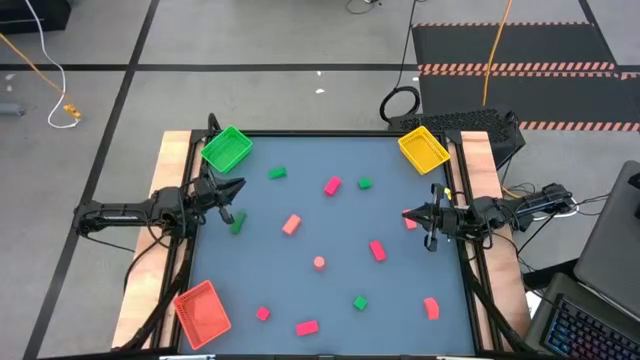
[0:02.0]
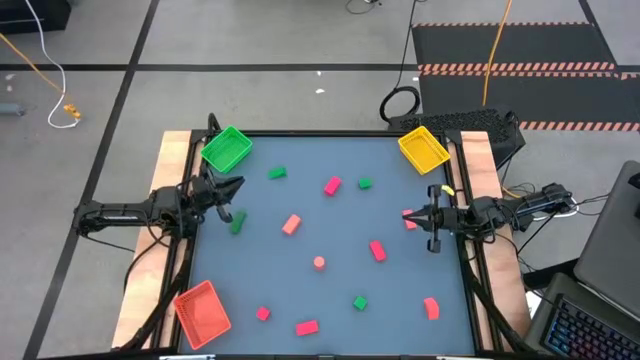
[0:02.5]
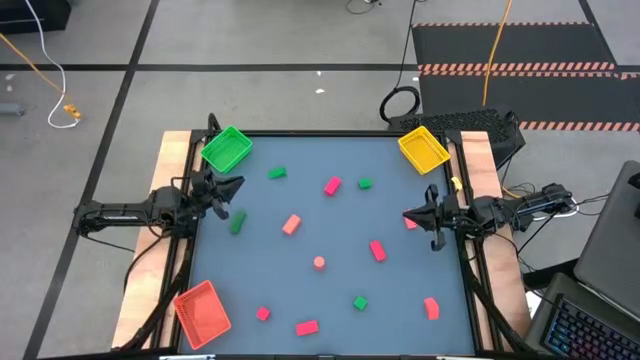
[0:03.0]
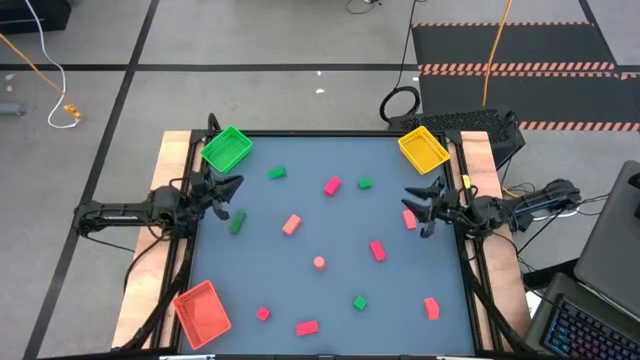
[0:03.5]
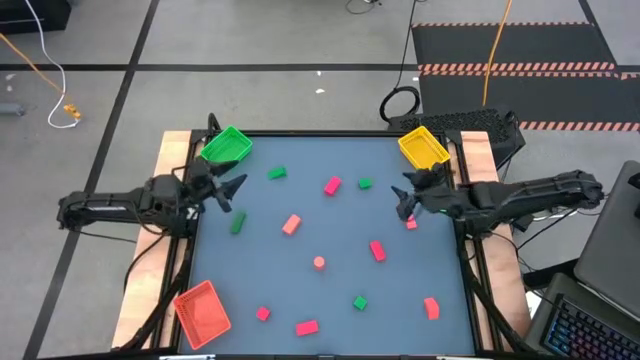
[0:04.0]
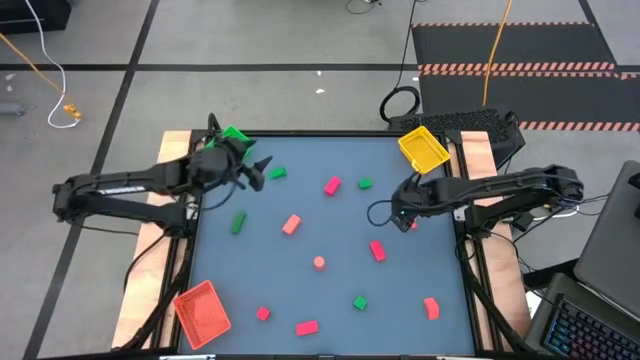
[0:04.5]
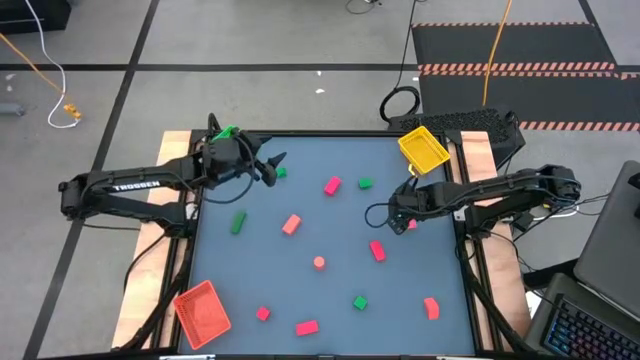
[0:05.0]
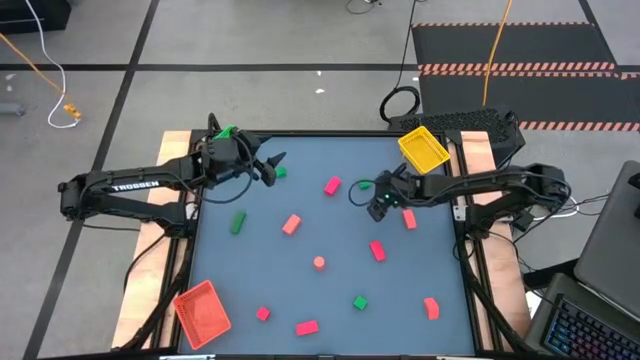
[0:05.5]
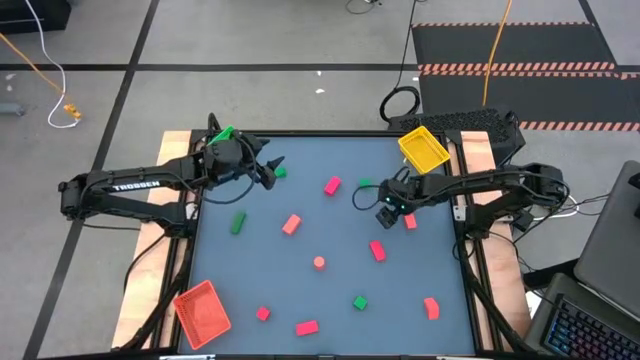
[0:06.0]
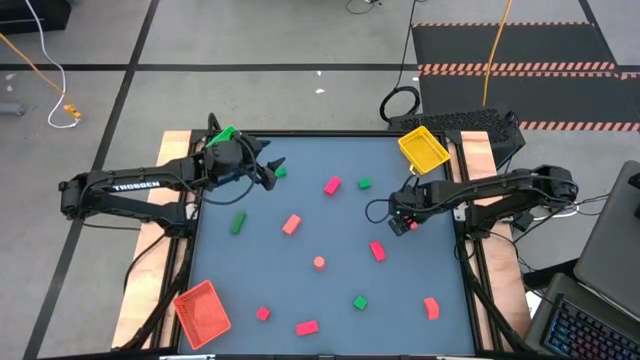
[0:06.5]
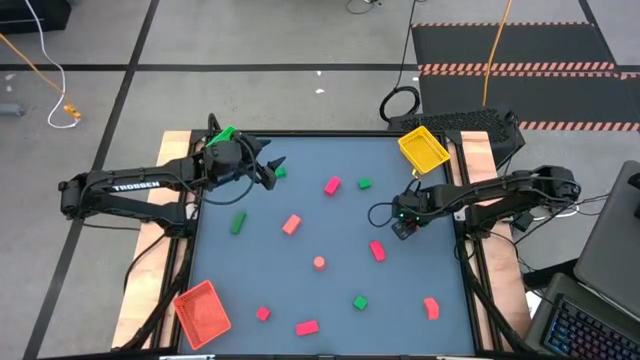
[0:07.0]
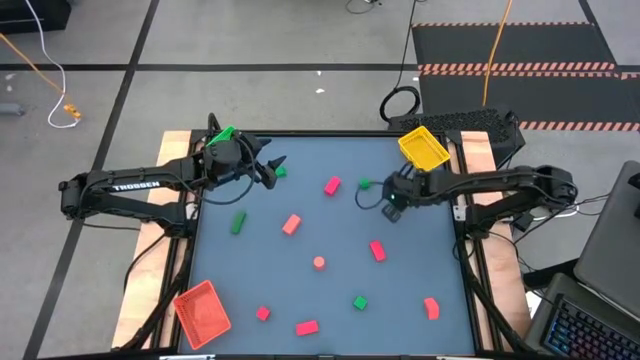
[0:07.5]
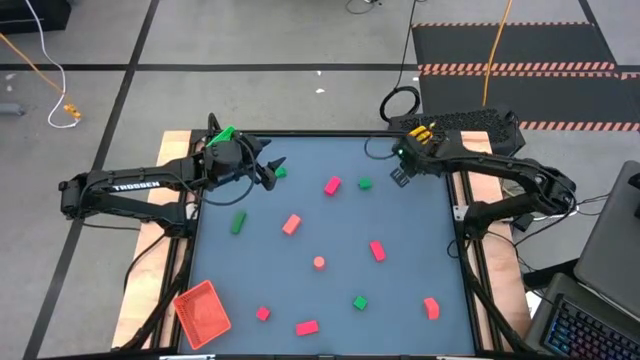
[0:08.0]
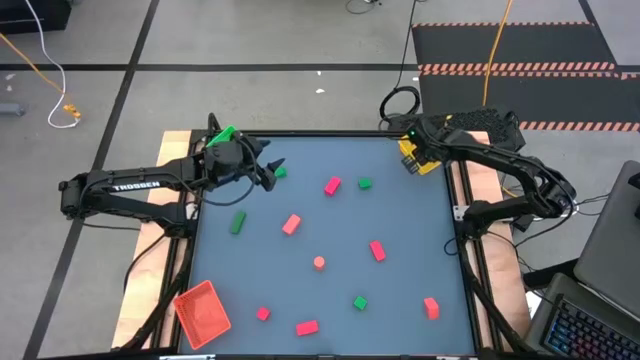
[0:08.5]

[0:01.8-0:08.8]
Task: Sort & place blocks by color
Put the orange block into the orange bin

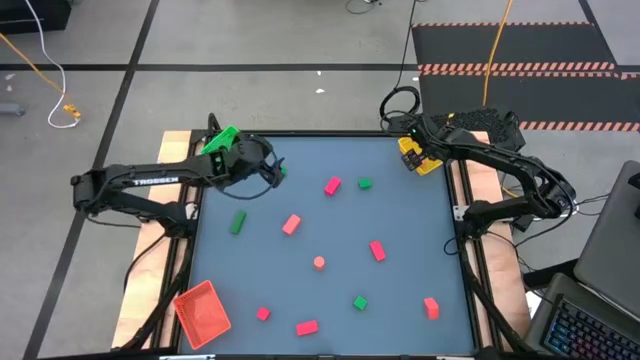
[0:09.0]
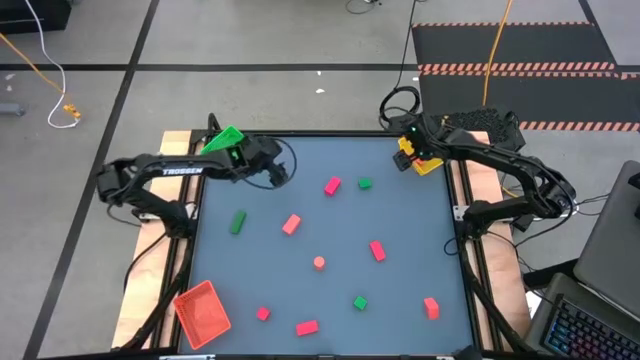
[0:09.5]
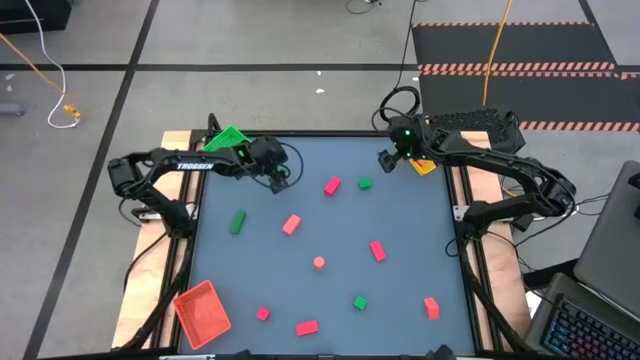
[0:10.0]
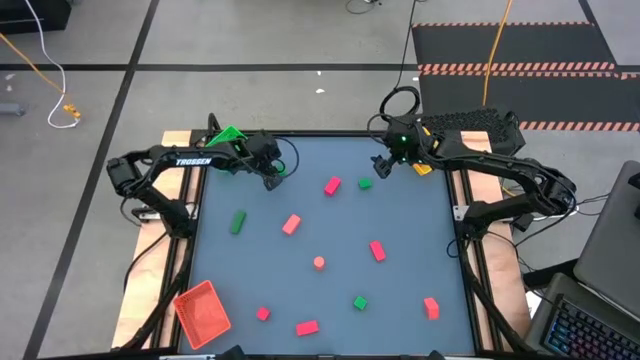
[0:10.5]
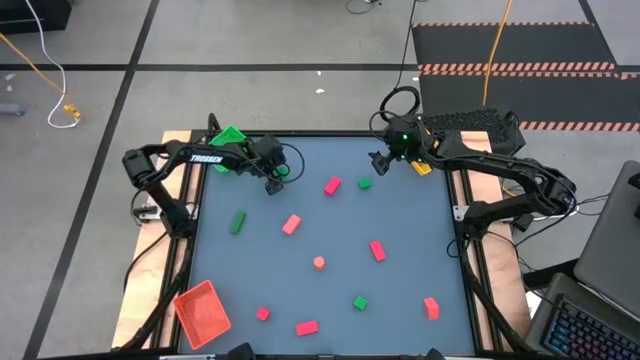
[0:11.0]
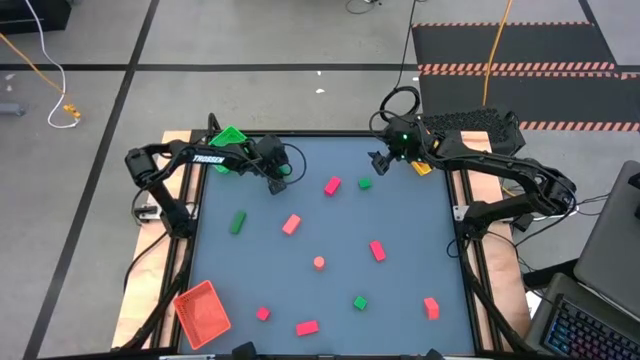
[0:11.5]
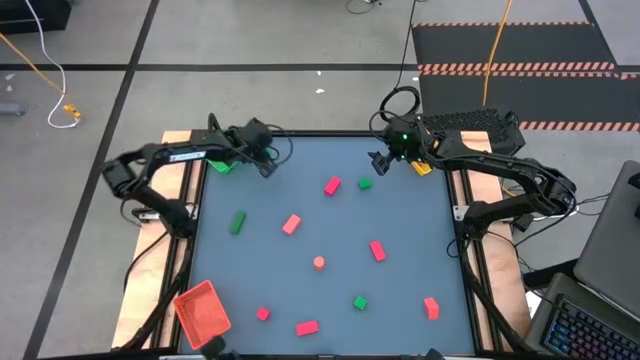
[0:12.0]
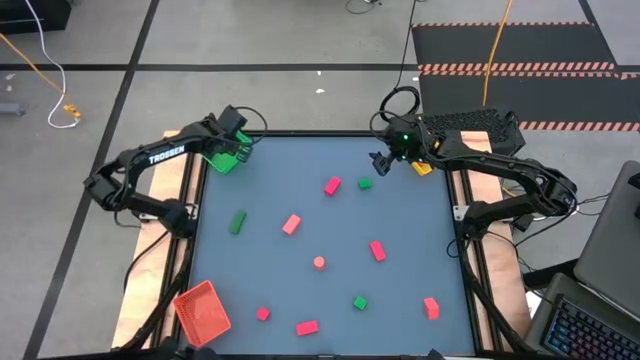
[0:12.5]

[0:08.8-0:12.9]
Put the green block into the green bin

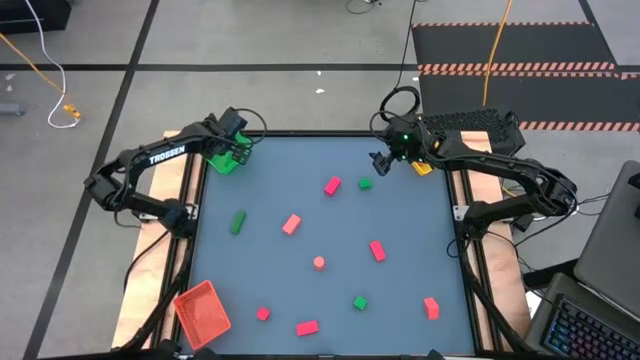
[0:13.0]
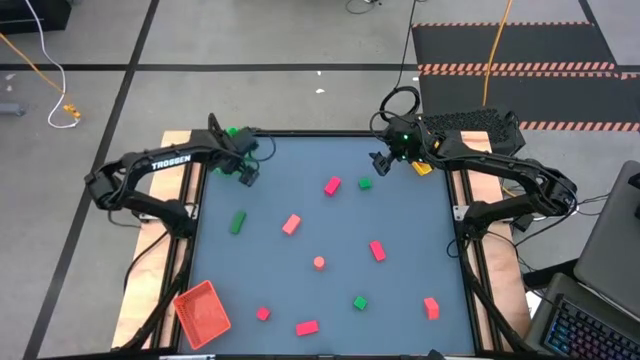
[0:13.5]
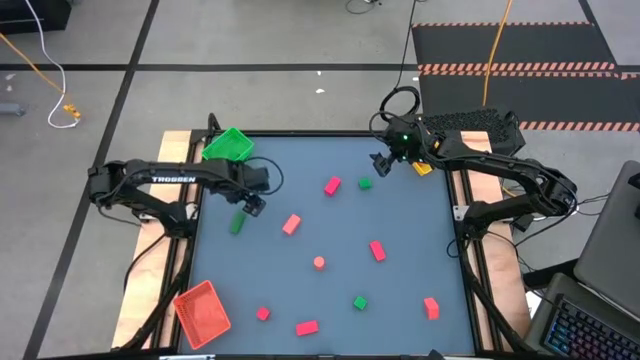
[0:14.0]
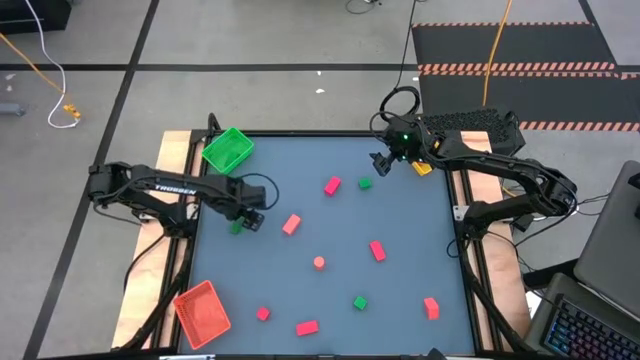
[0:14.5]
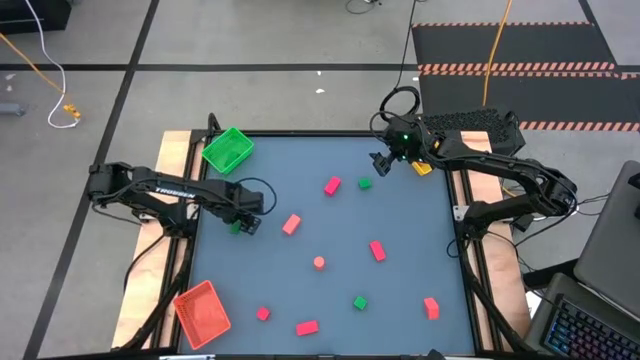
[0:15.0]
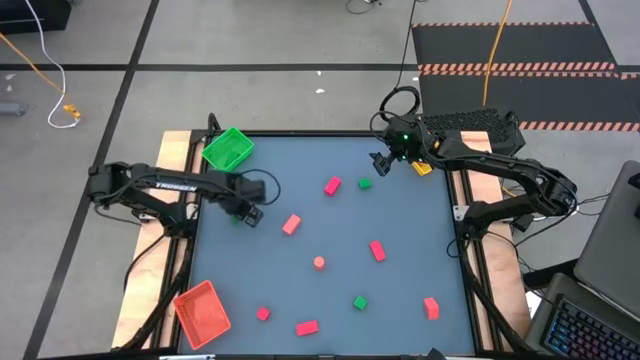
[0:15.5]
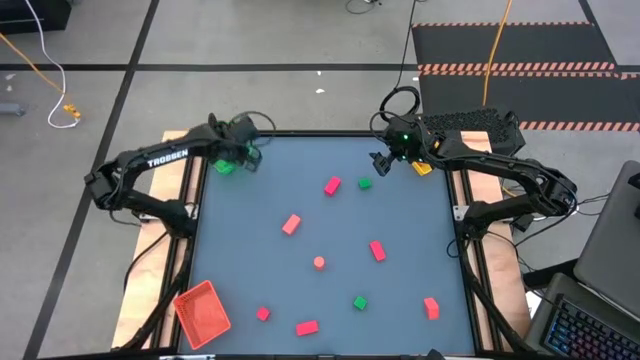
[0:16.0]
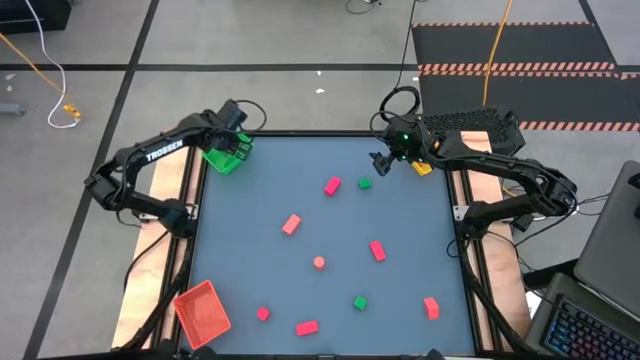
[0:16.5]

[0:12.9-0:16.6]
Put the green block into the green bin

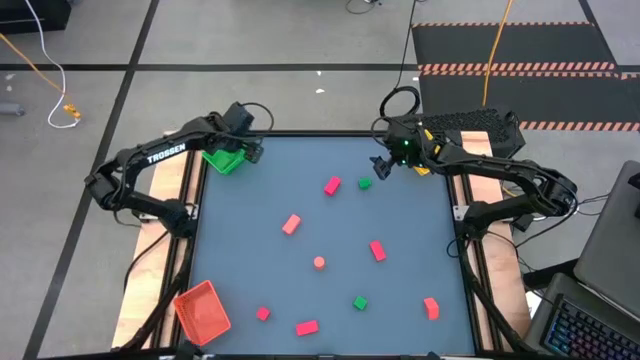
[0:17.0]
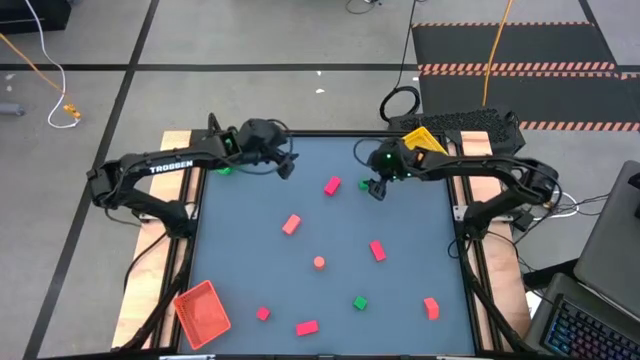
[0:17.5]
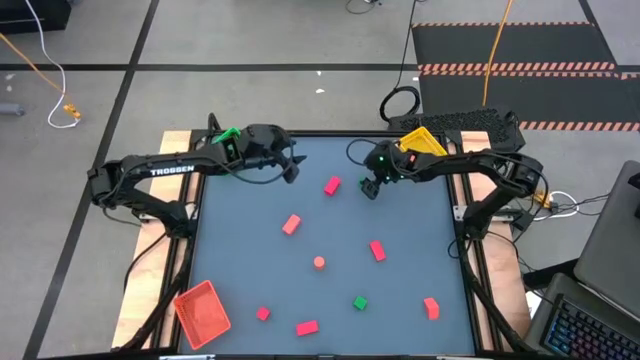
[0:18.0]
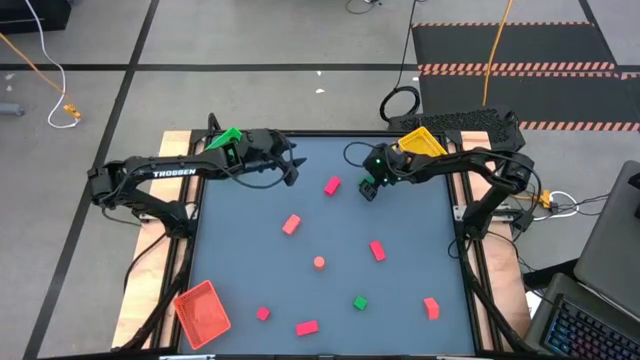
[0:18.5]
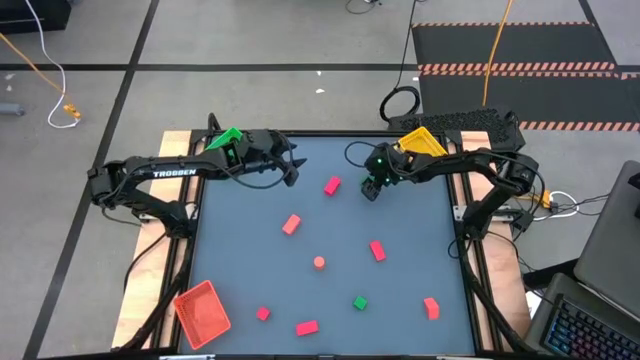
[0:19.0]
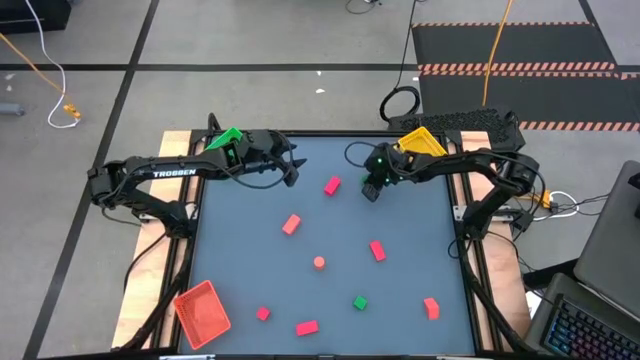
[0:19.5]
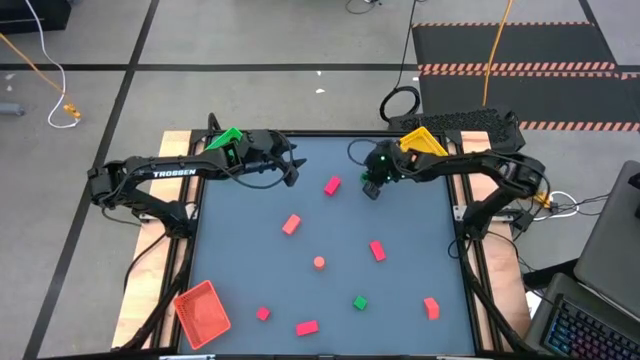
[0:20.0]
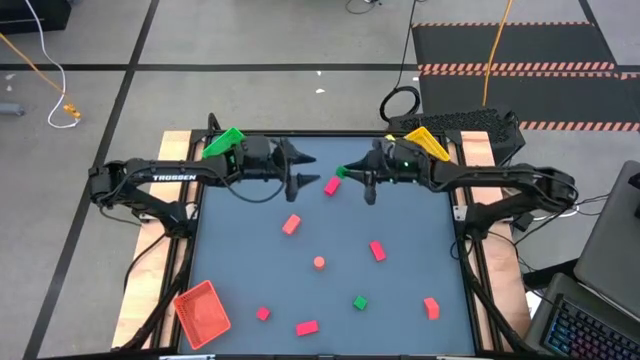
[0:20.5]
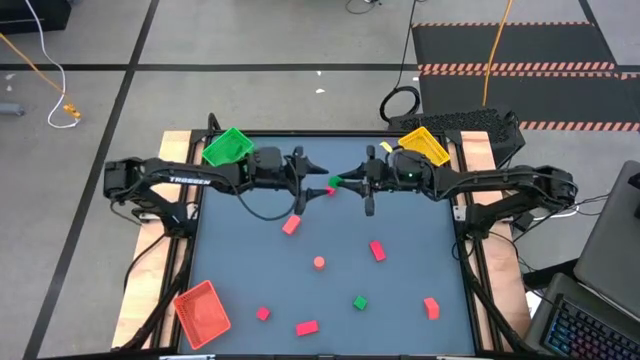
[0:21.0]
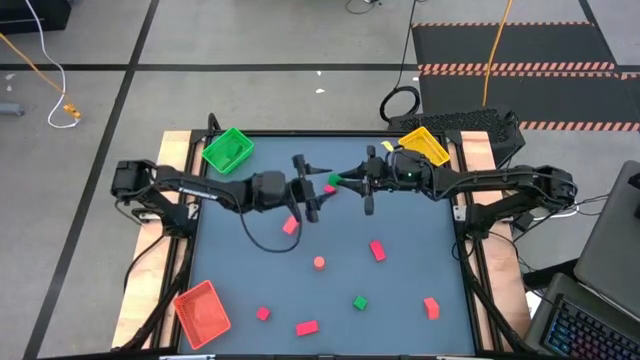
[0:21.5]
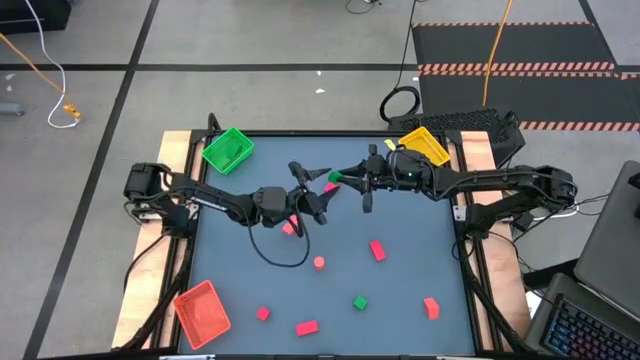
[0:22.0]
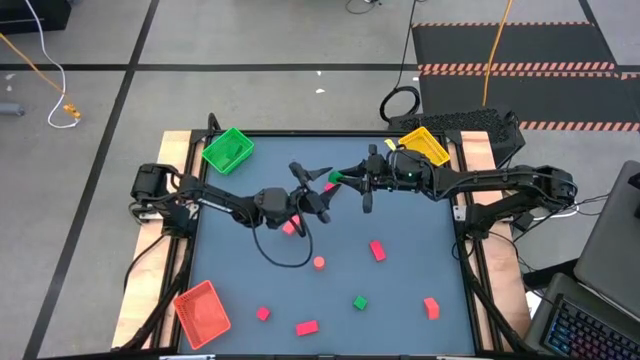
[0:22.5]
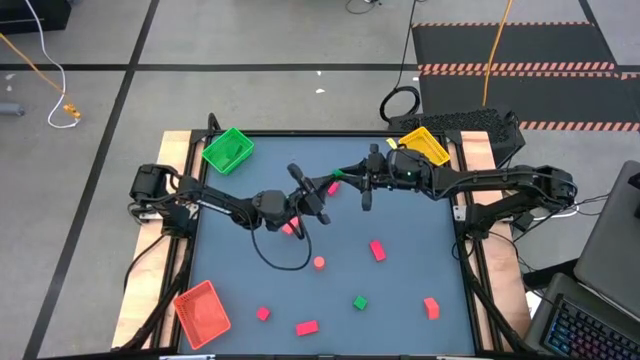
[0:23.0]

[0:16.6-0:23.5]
Put the green block into the green bin
